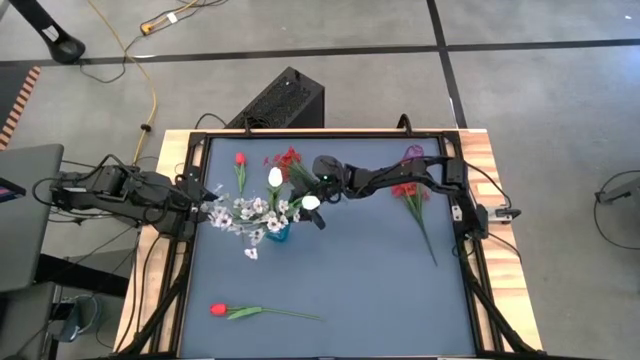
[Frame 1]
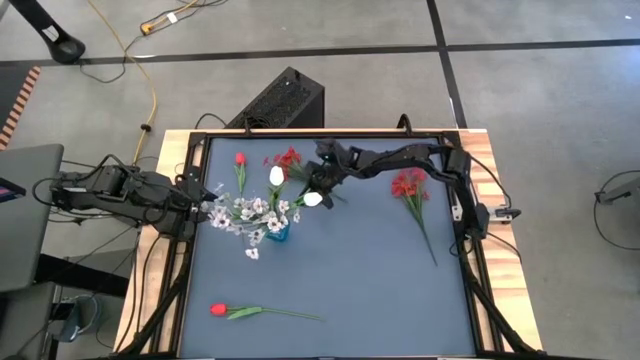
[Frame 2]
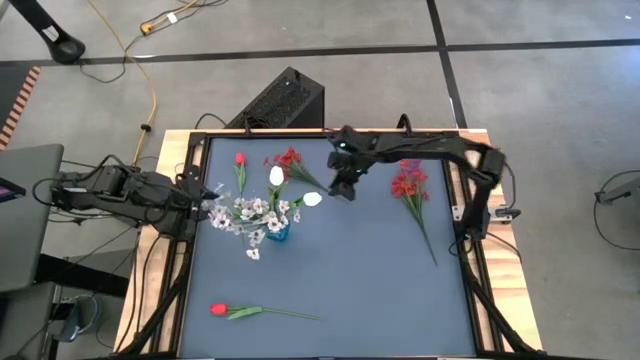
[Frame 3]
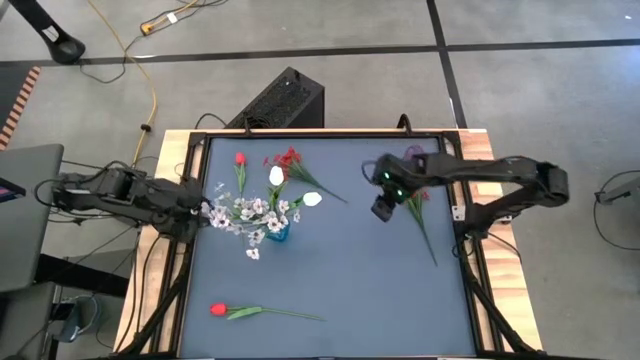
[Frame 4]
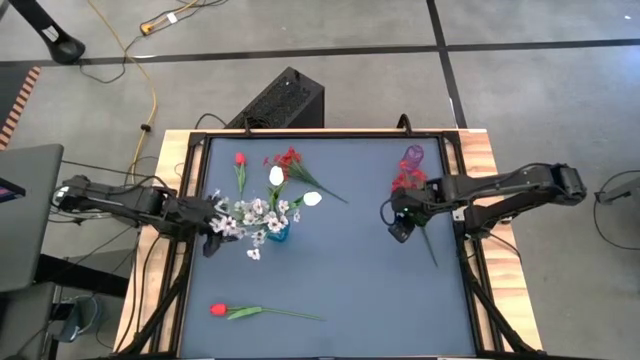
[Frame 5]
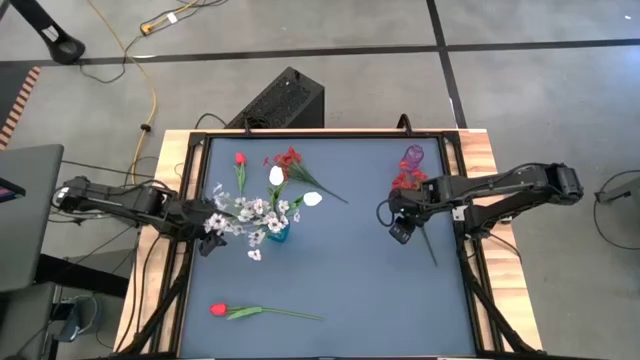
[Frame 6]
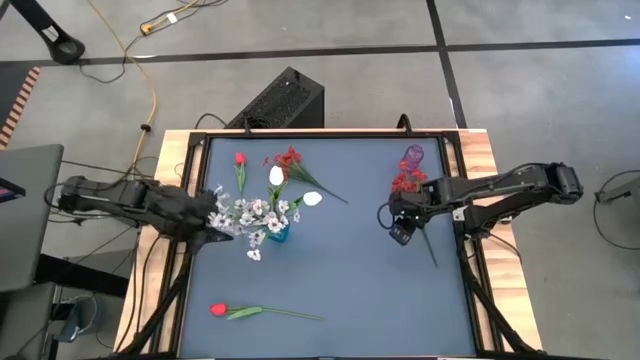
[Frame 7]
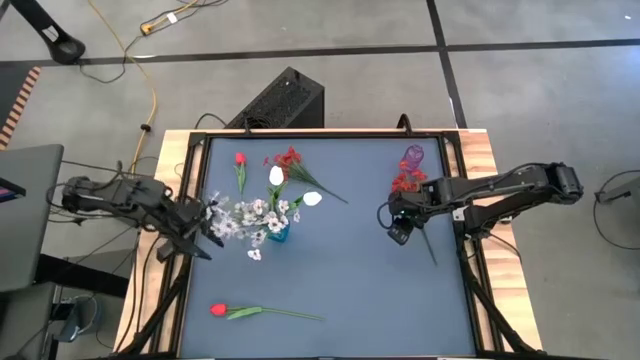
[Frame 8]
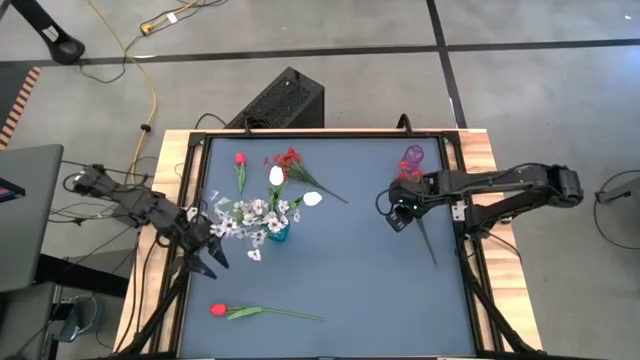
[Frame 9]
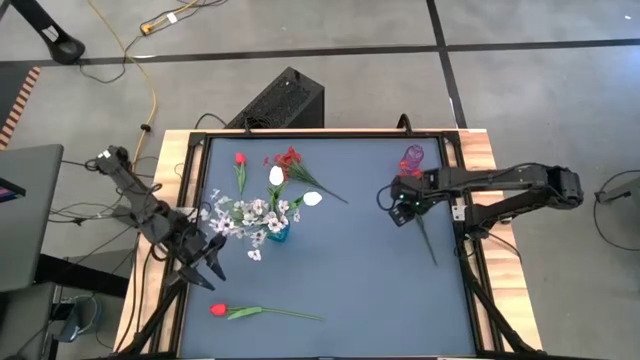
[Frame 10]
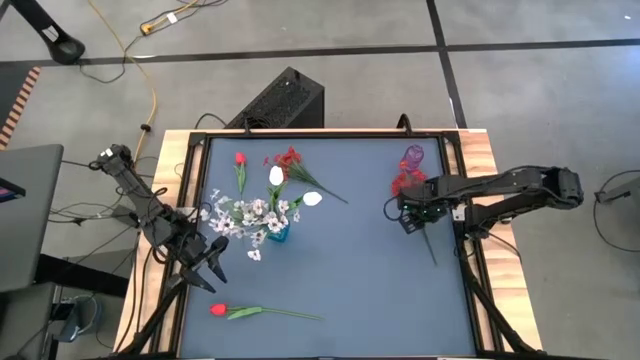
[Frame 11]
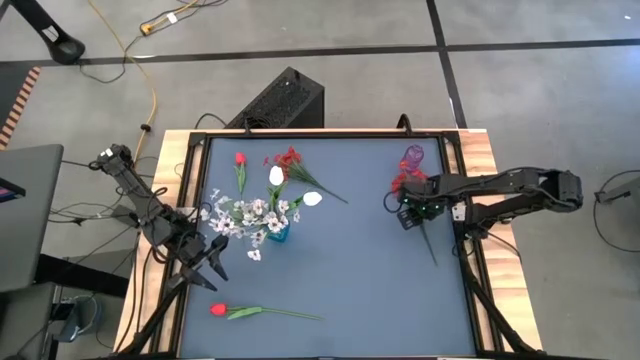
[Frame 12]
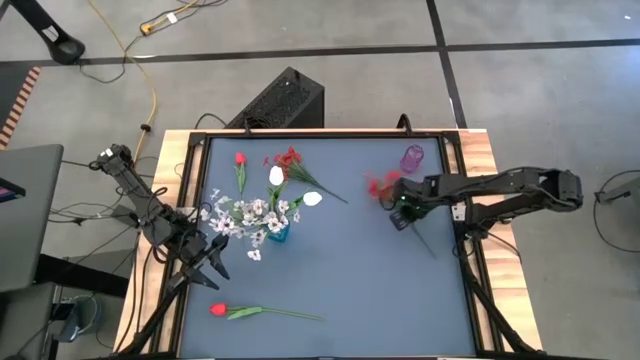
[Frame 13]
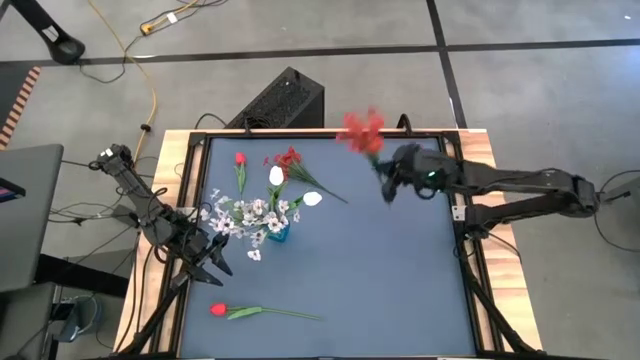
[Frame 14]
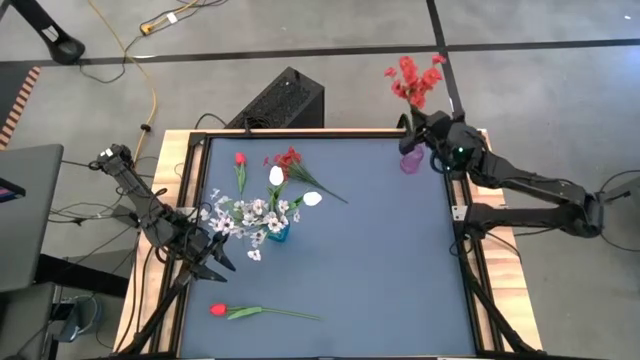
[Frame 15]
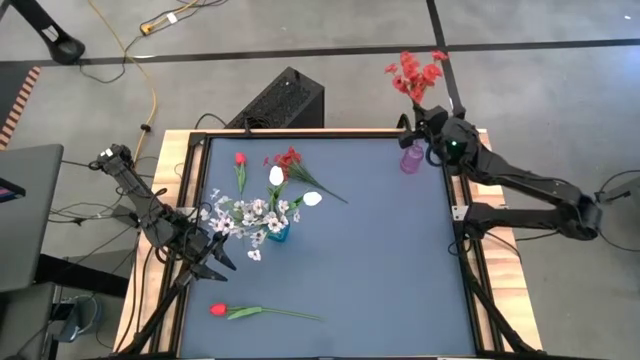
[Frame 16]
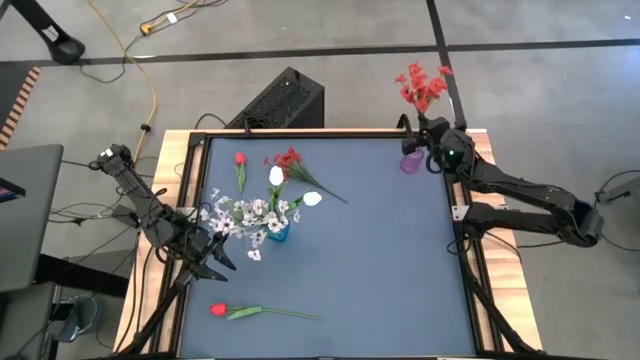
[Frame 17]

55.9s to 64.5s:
Task: Sort flowers into vase by color
Put the right red flowers into the purple vase

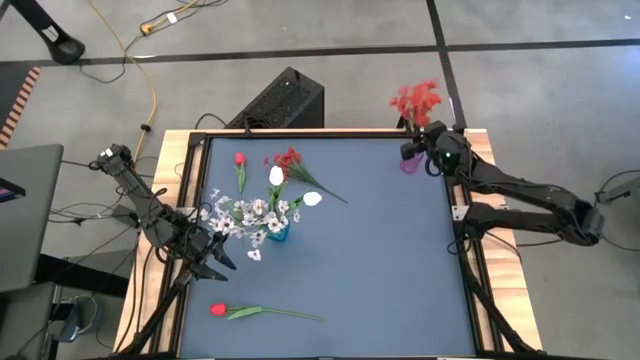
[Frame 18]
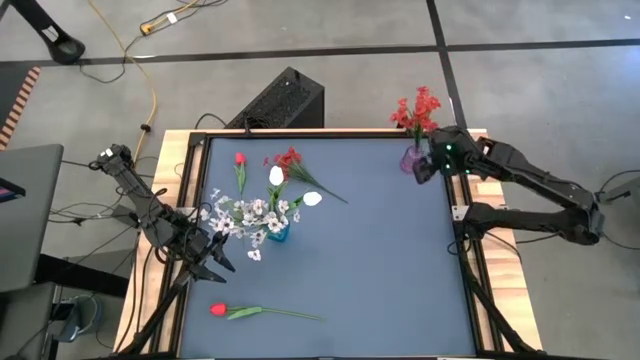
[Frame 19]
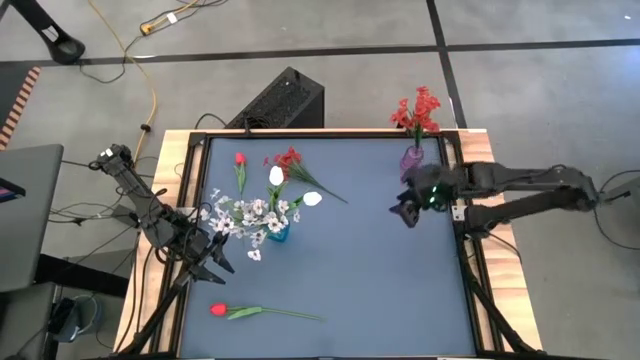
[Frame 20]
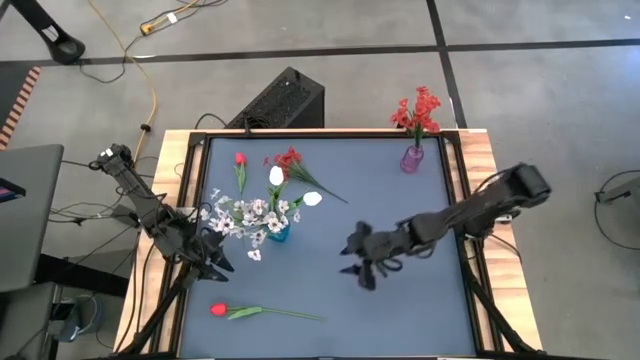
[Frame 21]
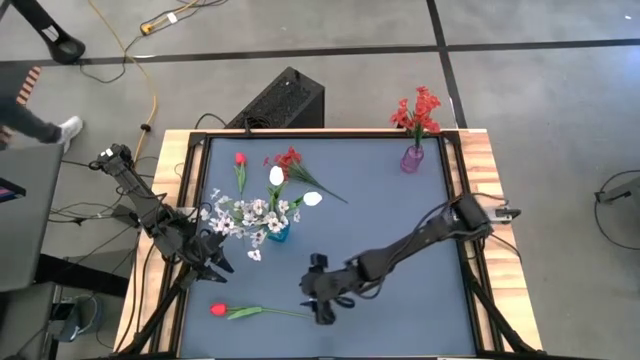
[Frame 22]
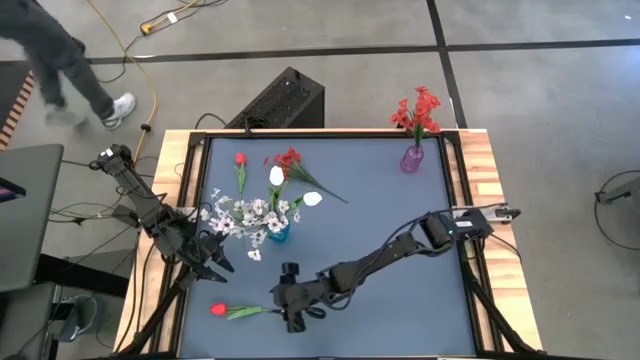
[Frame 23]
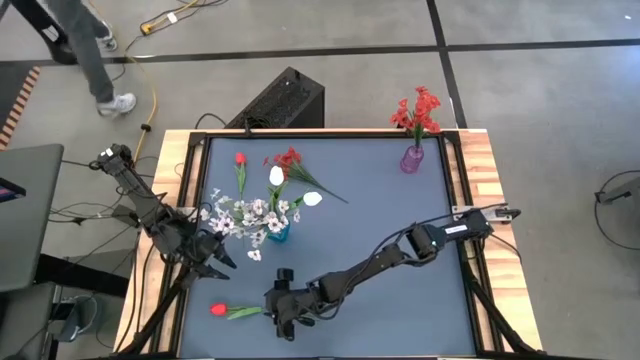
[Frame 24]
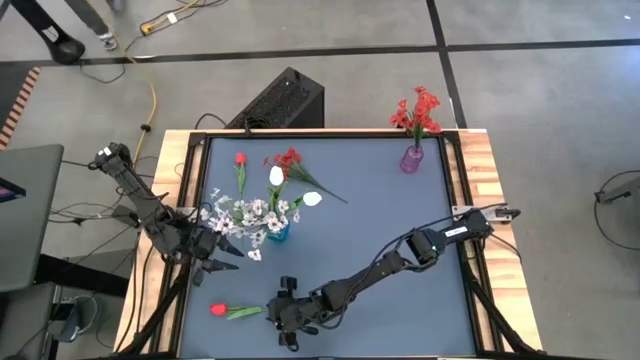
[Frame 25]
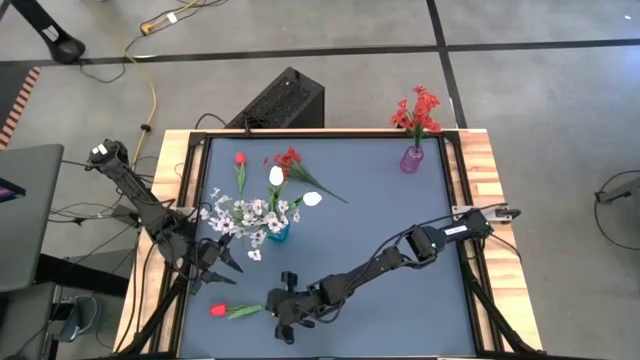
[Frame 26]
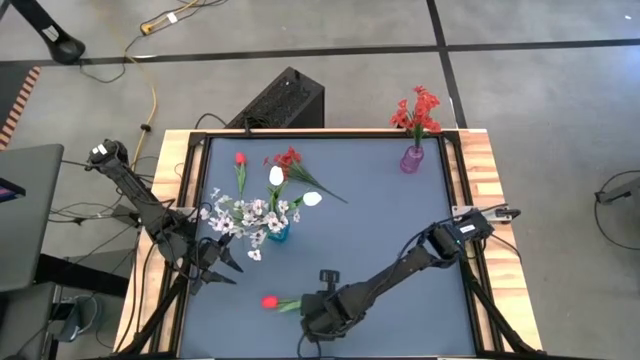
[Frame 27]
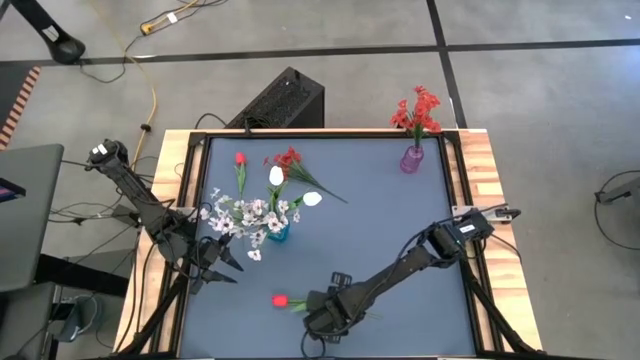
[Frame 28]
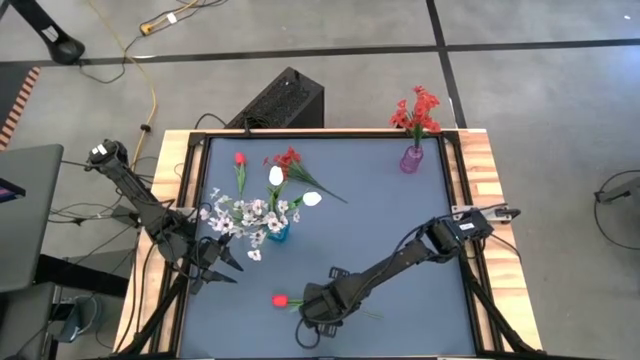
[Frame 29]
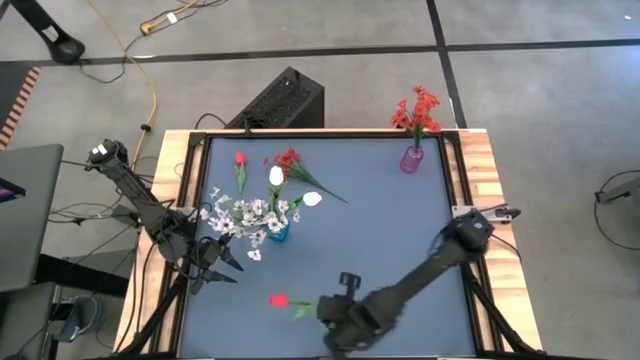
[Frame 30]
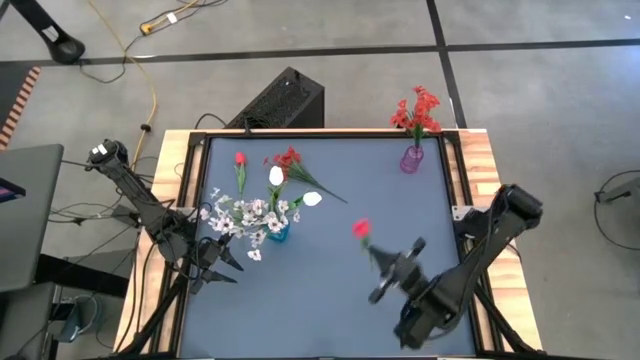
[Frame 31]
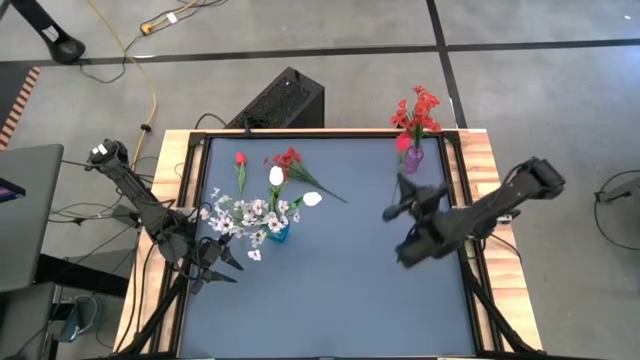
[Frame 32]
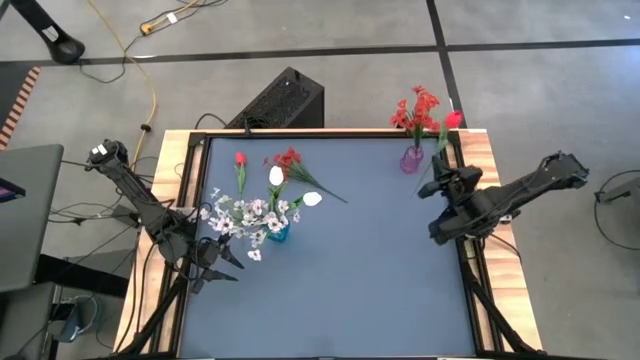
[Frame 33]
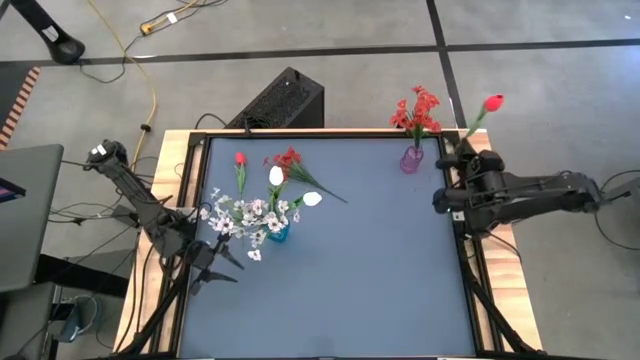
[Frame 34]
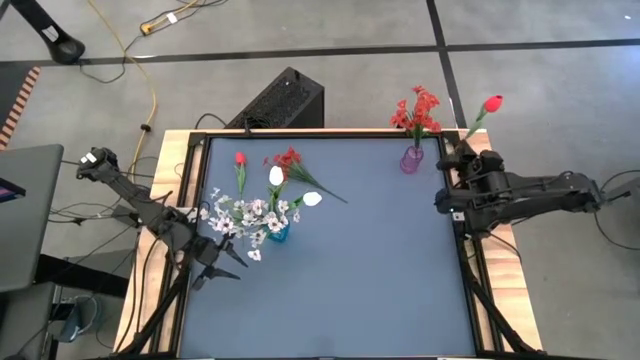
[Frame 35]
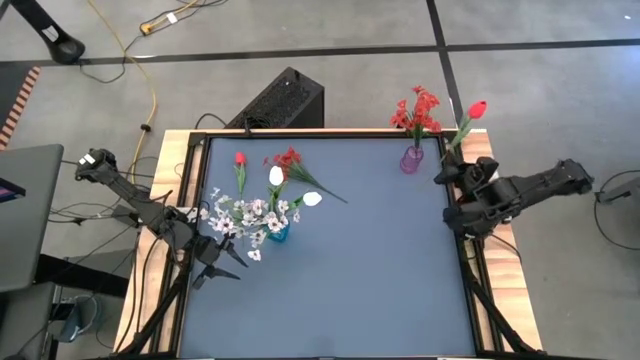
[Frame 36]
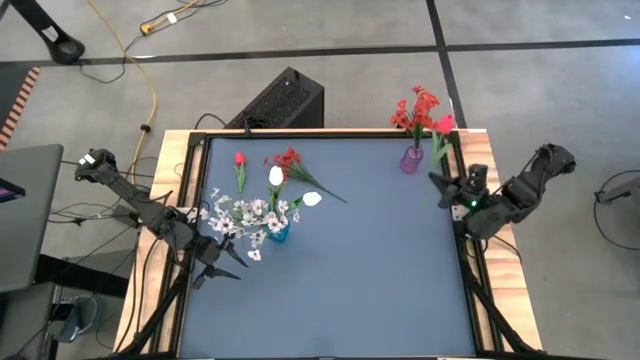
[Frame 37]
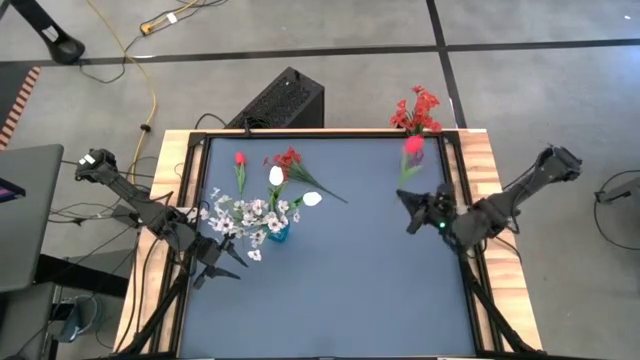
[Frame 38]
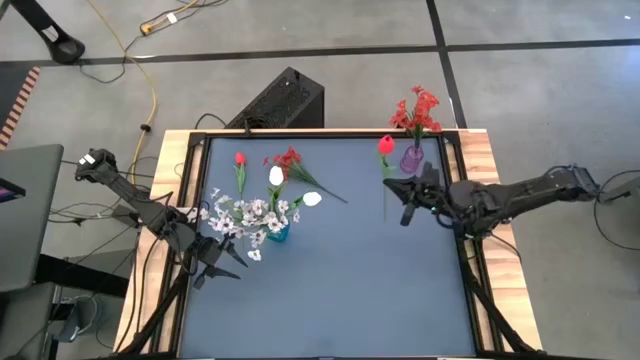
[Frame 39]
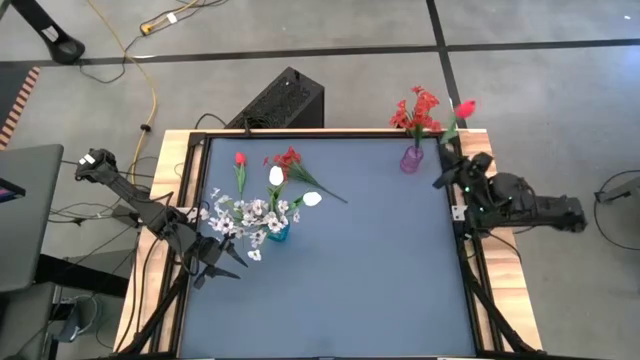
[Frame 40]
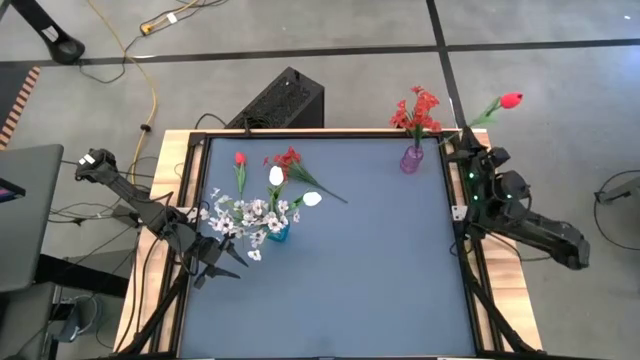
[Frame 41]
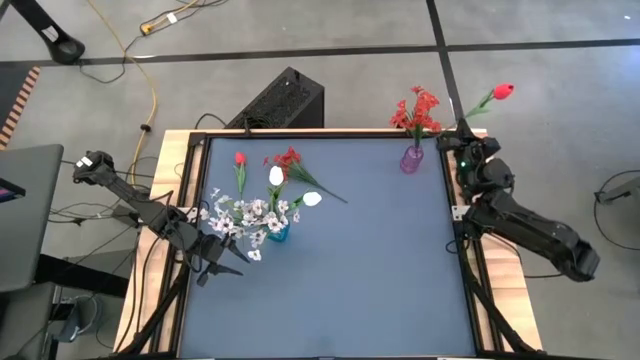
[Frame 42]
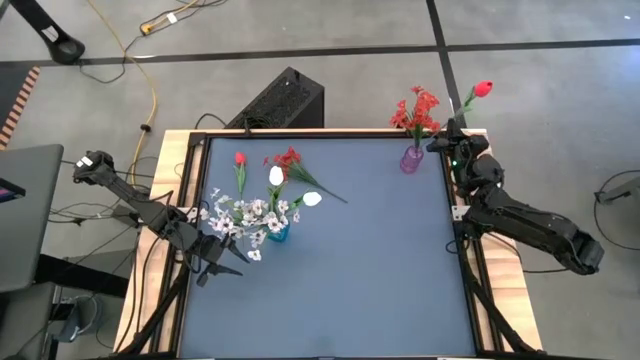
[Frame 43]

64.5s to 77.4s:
Put the bottom red flower into the purple vase

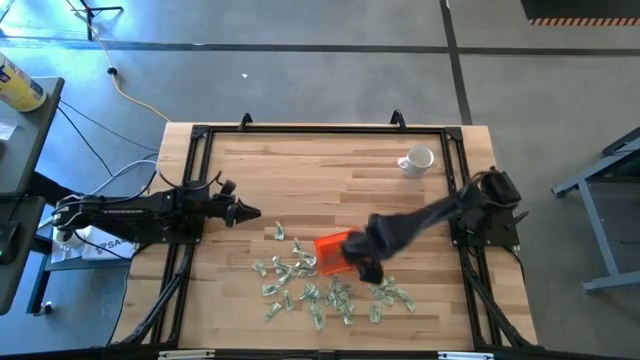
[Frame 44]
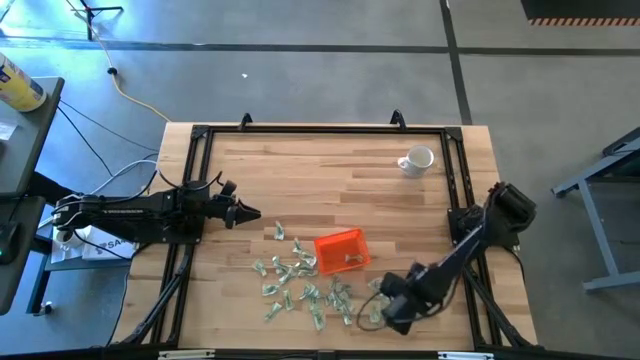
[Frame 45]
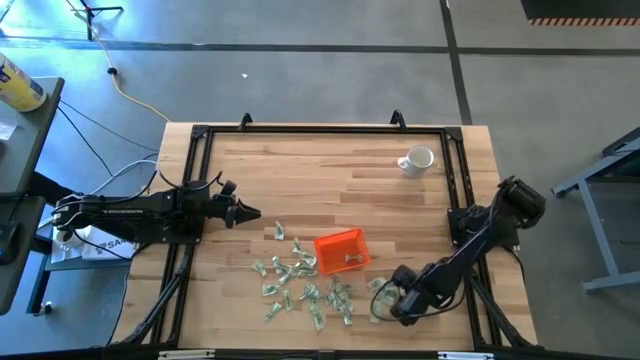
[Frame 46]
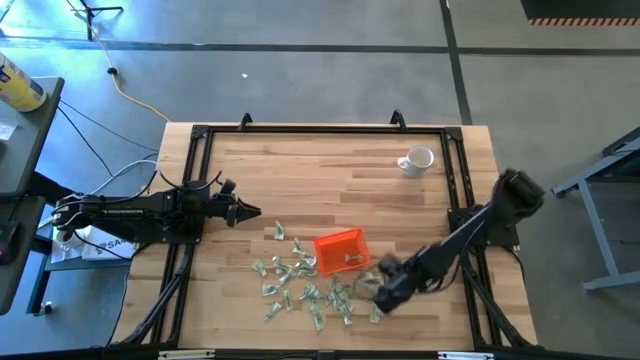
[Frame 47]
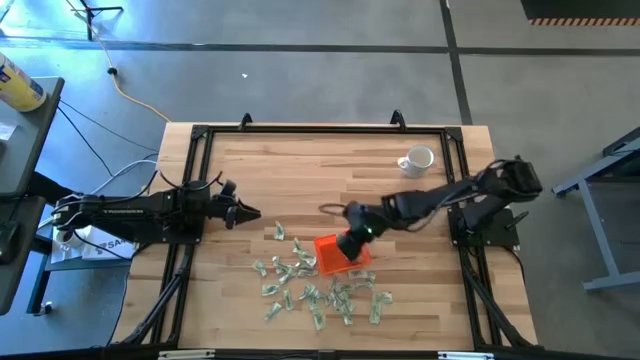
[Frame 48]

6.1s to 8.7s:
Task: Pick and place Stevia / Truvia into bins
Put the stevia packet into the orange bin
